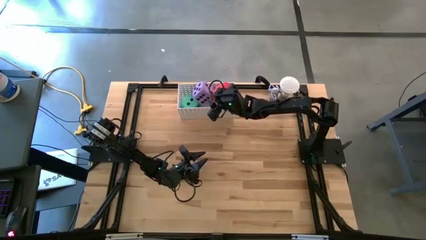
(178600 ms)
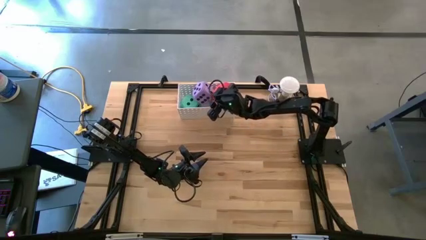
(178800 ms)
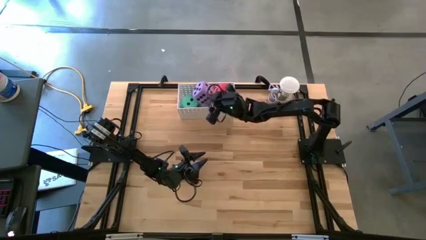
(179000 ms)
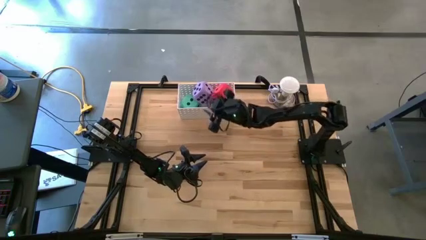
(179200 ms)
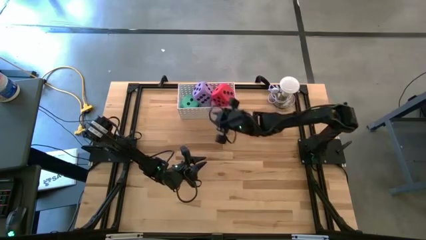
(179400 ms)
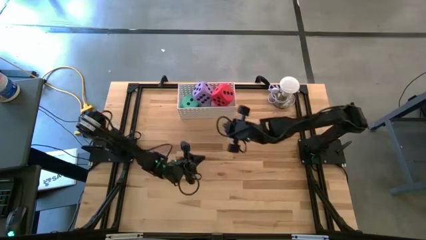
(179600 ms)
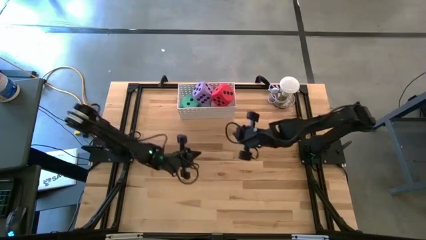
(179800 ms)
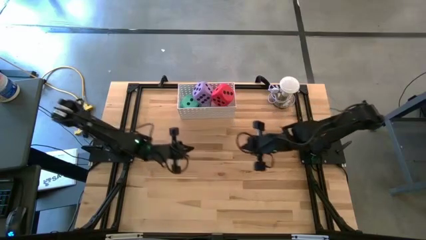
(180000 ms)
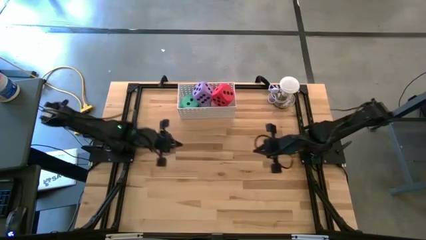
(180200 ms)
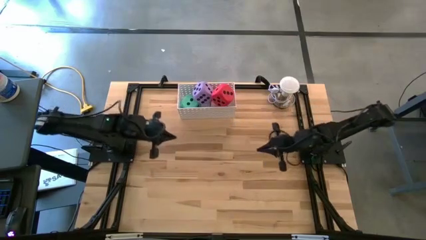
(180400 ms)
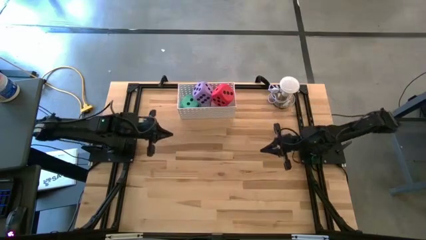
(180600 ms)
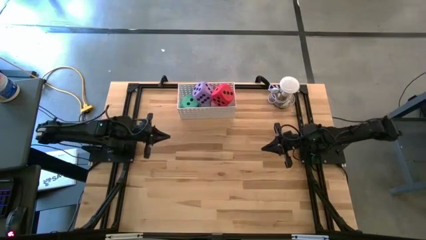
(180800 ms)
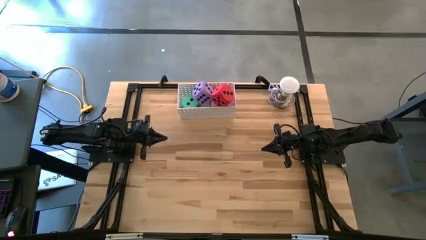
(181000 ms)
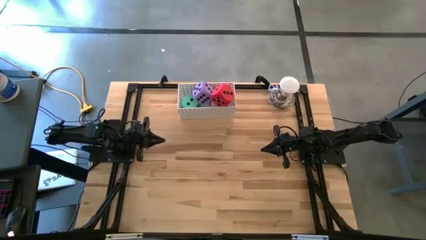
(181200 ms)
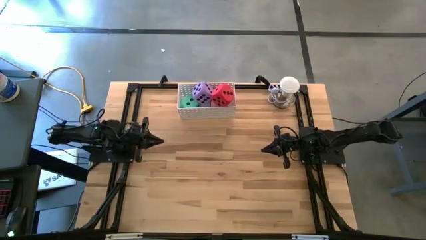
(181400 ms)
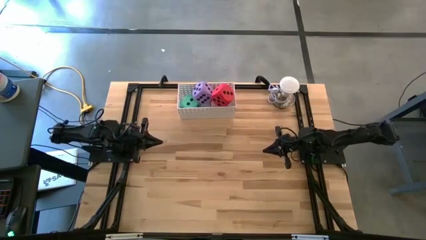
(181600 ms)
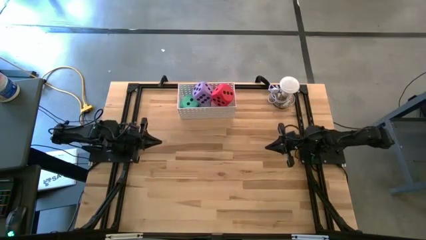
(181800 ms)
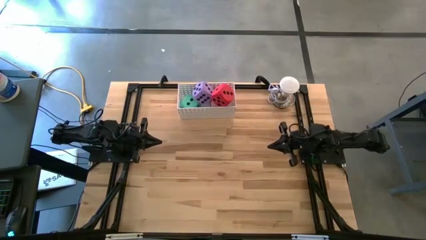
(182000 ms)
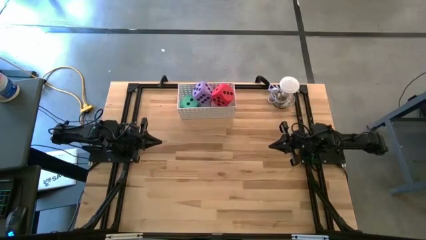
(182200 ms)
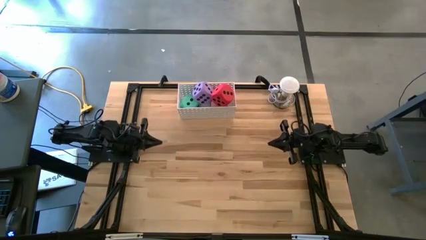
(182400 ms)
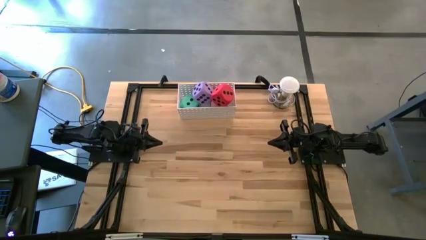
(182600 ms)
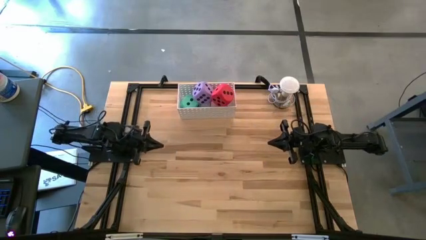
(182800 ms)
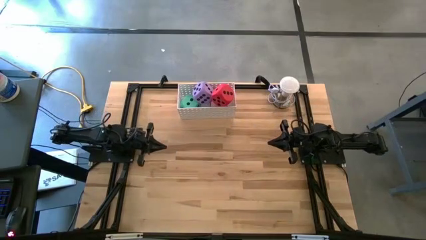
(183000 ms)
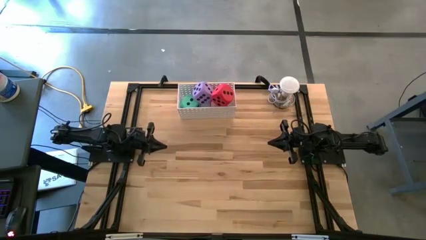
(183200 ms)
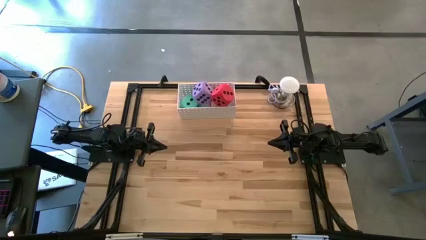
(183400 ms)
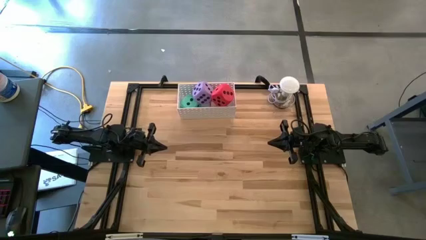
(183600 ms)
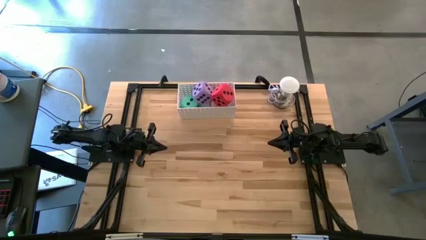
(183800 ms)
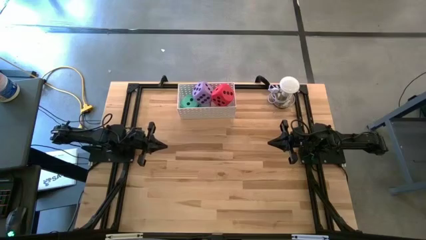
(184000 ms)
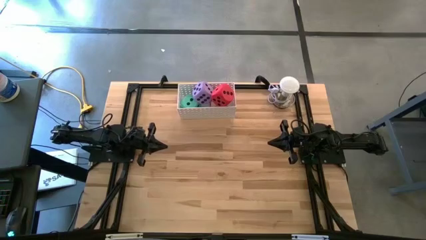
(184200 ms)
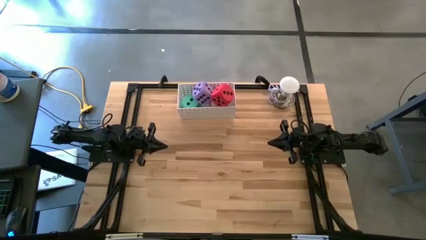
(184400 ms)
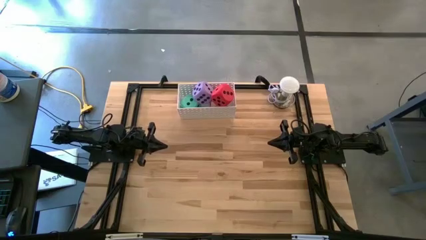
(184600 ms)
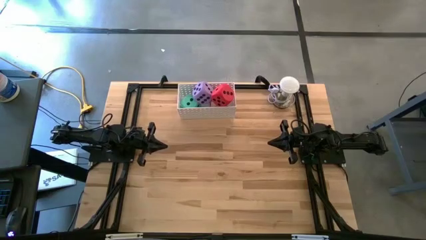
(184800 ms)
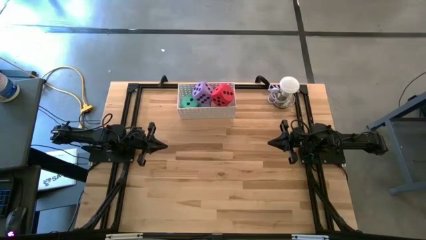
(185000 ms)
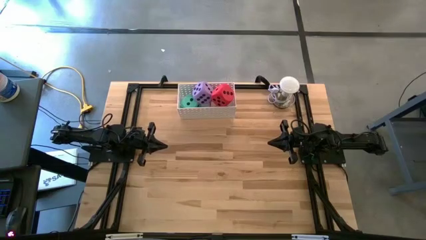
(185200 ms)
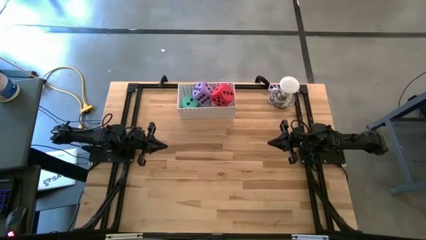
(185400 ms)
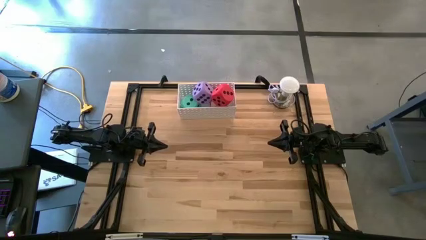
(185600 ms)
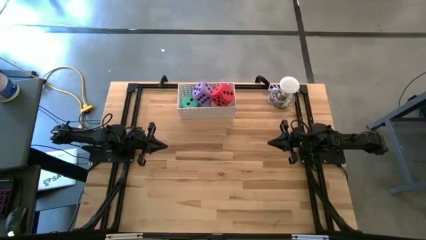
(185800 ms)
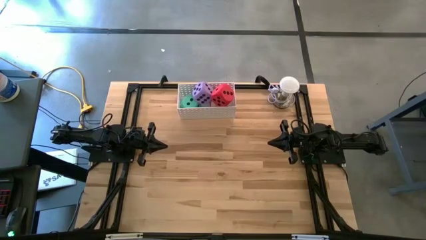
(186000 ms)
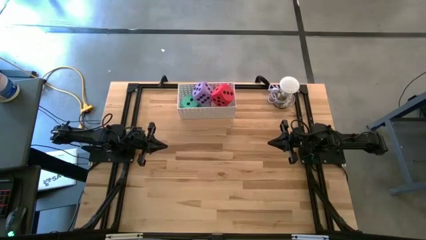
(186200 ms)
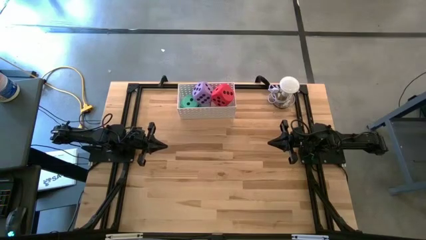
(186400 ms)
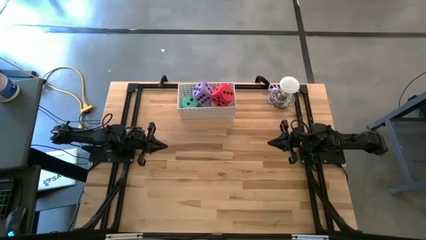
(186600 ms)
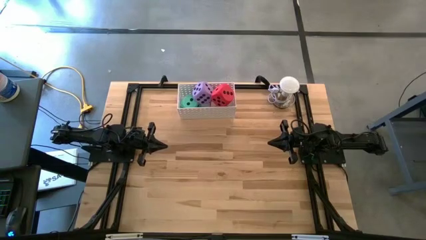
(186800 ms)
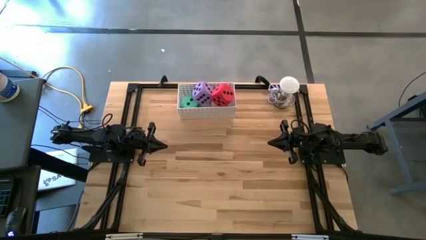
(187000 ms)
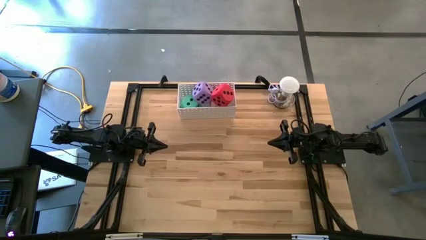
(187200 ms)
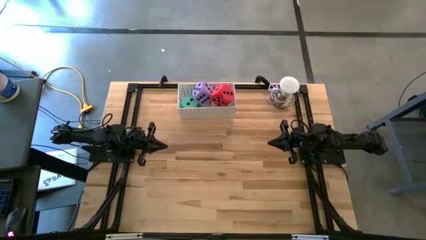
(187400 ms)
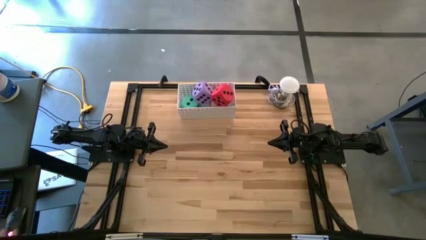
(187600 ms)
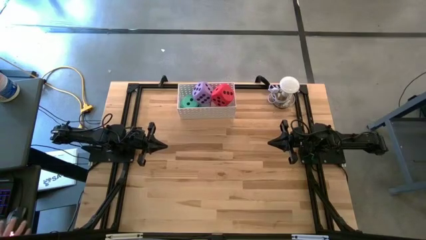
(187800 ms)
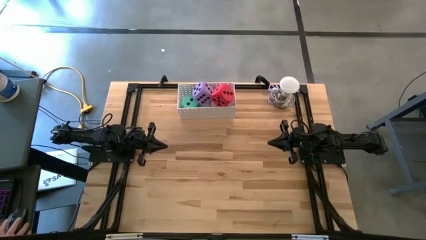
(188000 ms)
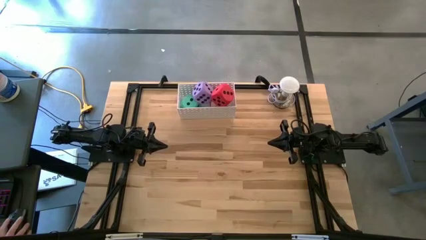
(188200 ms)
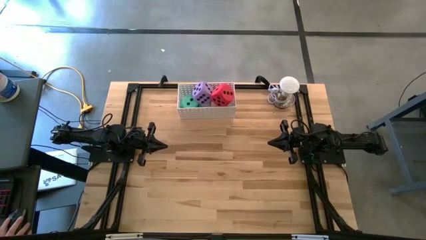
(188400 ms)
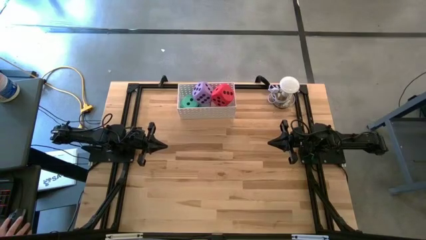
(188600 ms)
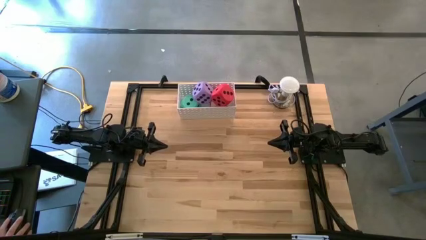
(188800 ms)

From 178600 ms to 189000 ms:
Task: Pick & Place Dice
Return to Home Position

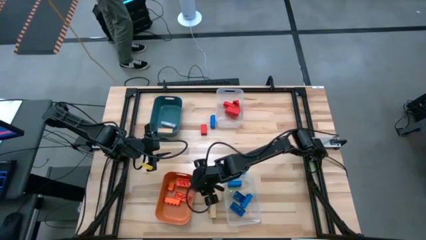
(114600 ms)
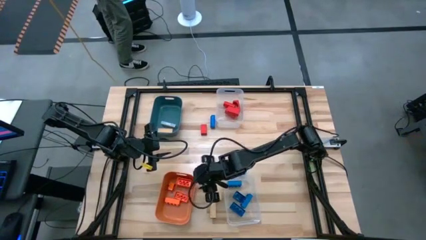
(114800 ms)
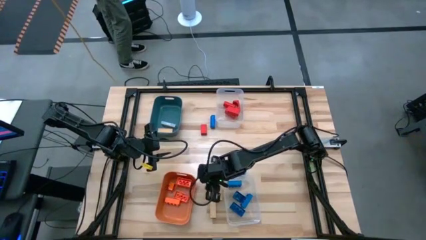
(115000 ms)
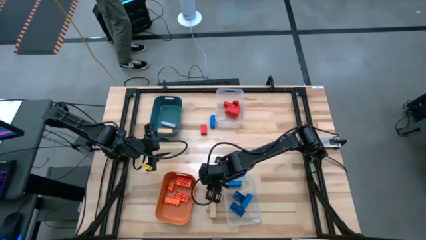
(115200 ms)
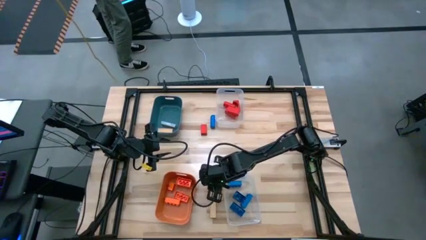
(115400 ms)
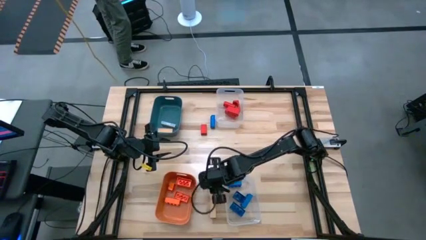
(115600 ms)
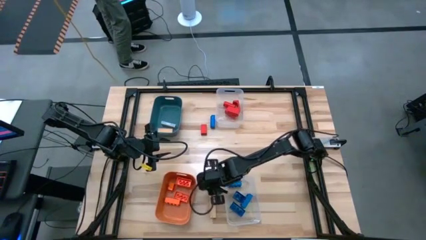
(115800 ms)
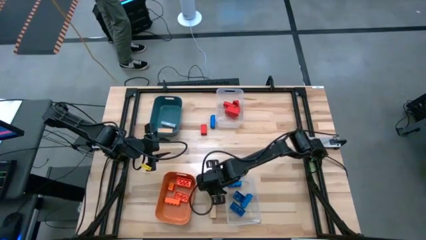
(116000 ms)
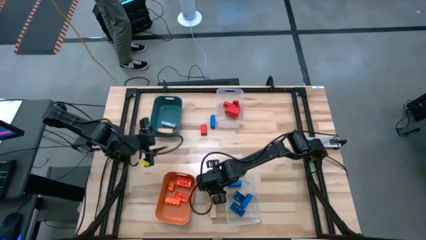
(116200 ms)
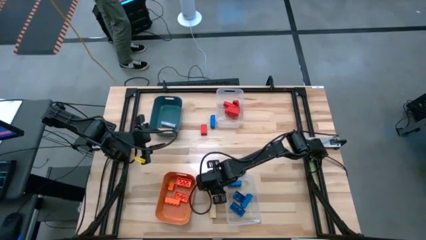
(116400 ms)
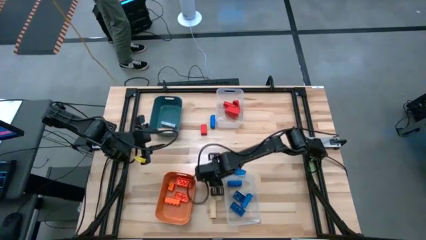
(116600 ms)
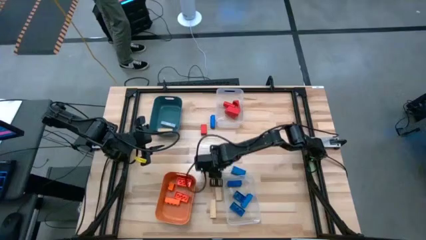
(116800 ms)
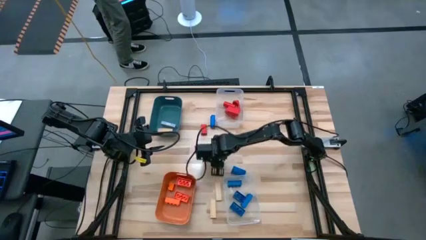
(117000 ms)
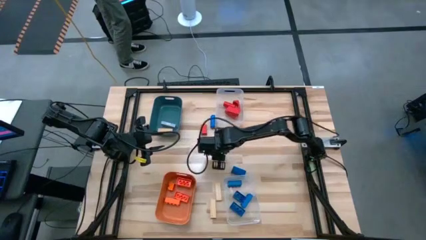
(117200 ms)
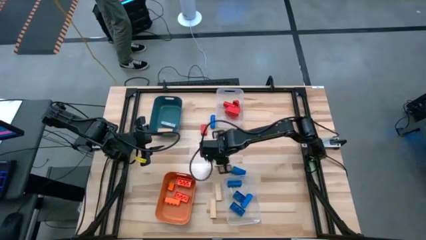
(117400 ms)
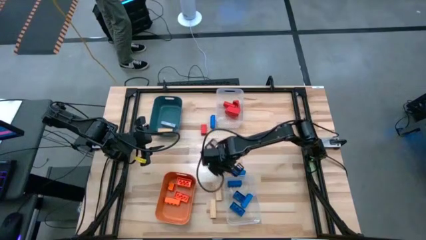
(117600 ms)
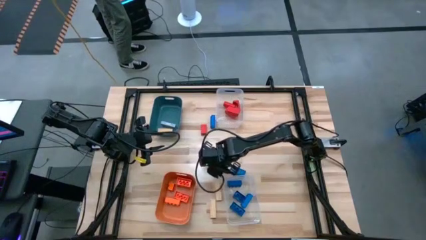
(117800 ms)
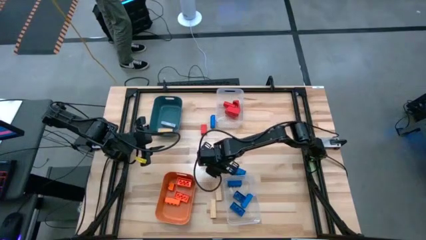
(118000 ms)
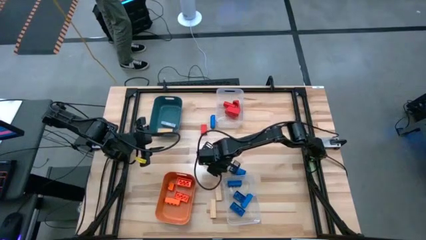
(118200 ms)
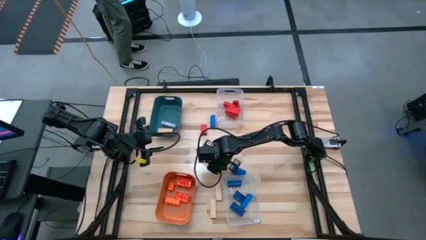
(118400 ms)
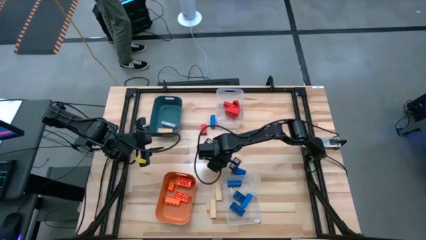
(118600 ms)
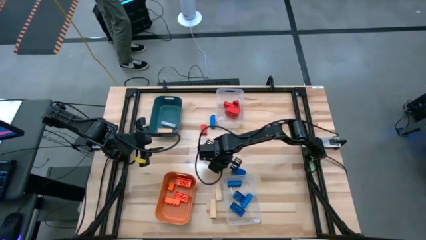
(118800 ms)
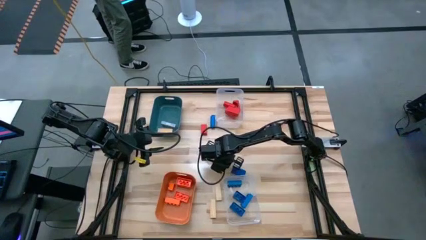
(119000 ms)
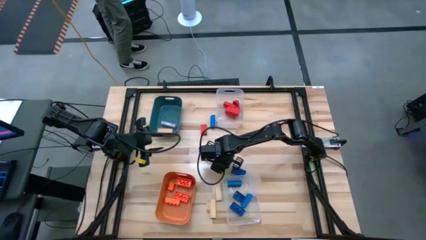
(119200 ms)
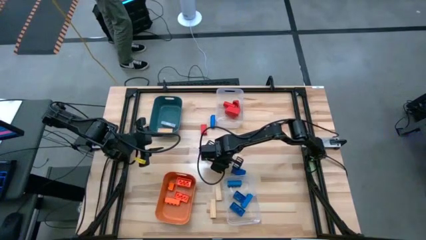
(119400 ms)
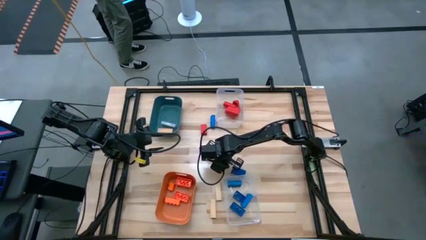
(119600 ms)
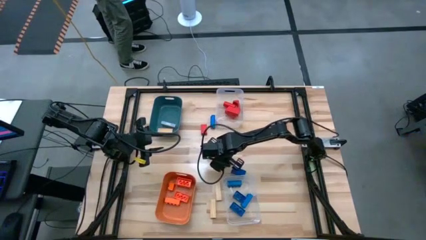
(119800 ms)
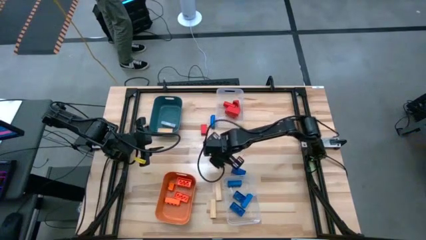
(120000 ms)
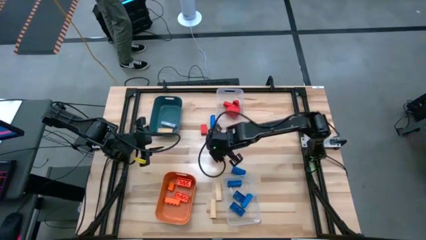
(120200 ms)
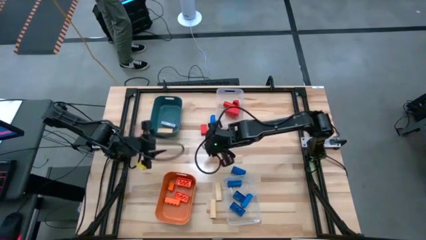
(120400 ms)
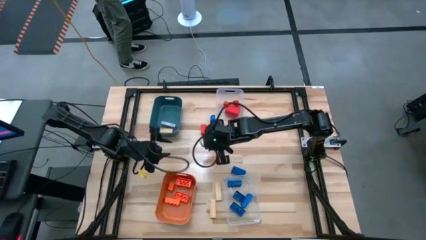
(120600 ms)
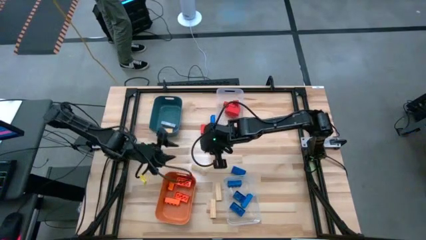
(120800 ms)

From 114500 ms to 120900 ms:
Task: Sort blocks
Put the brown wooden block into the blue bin
